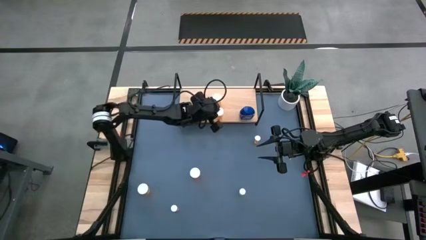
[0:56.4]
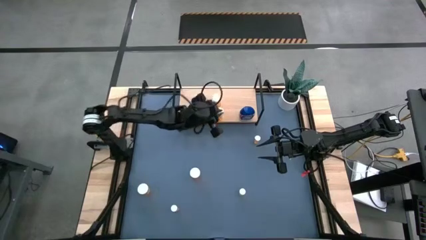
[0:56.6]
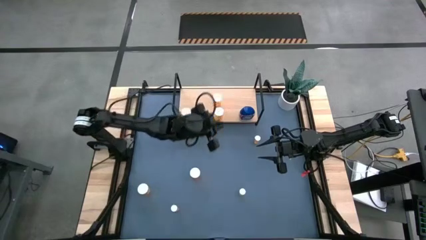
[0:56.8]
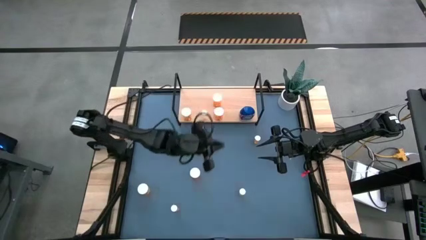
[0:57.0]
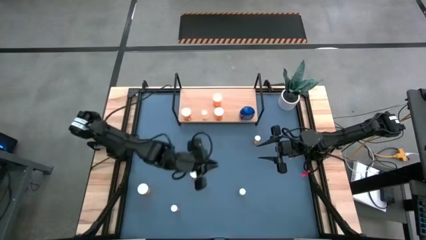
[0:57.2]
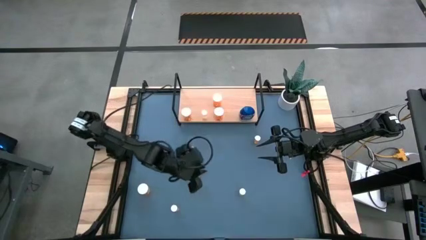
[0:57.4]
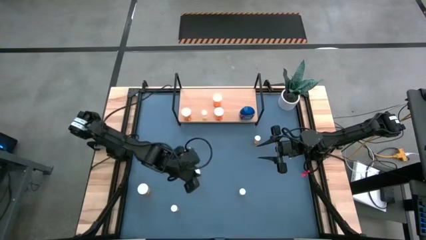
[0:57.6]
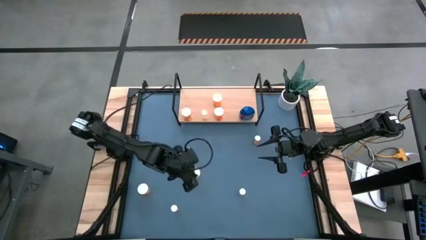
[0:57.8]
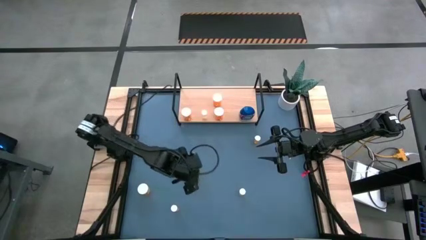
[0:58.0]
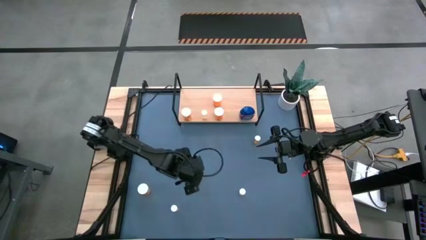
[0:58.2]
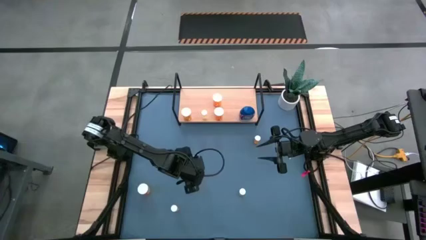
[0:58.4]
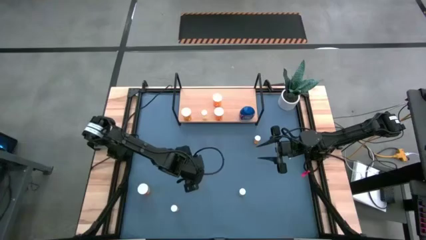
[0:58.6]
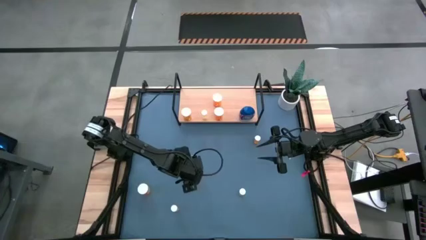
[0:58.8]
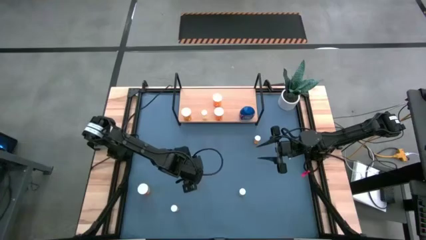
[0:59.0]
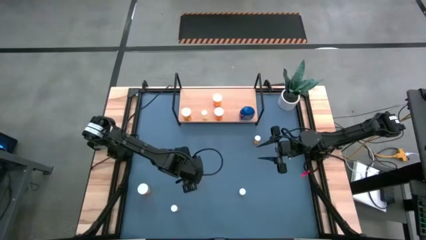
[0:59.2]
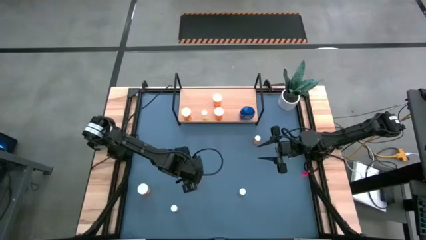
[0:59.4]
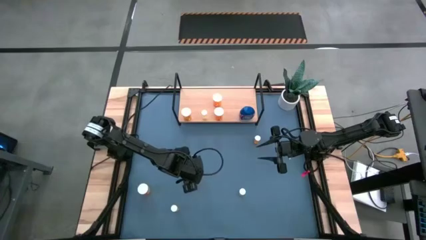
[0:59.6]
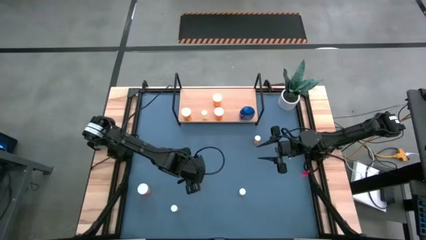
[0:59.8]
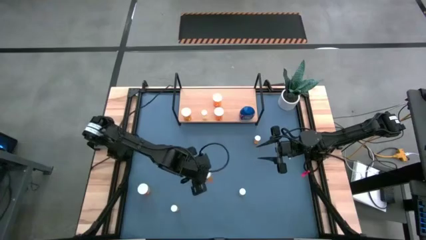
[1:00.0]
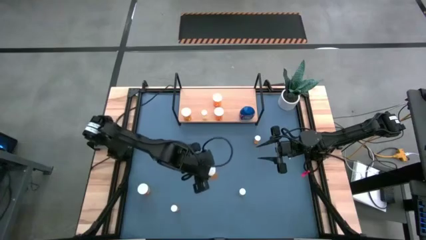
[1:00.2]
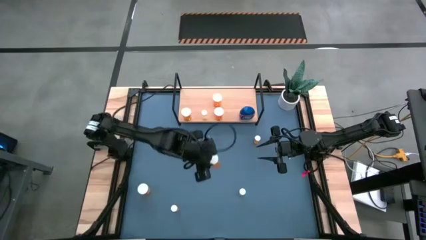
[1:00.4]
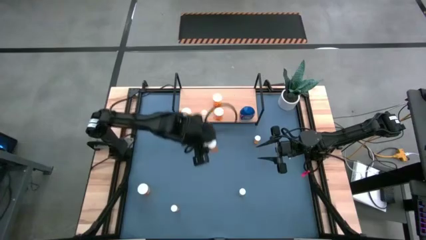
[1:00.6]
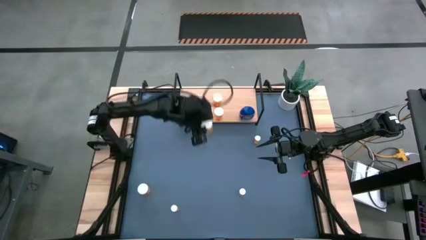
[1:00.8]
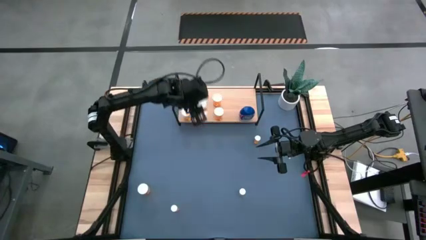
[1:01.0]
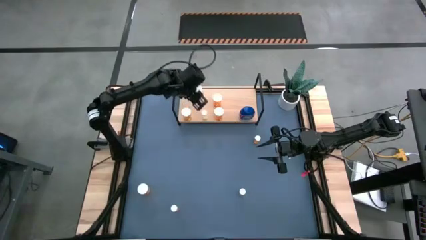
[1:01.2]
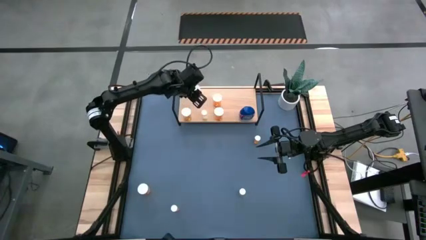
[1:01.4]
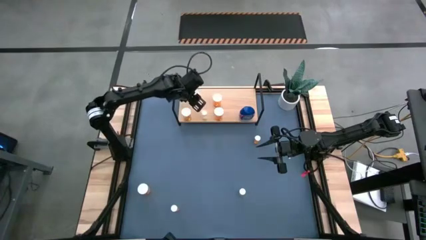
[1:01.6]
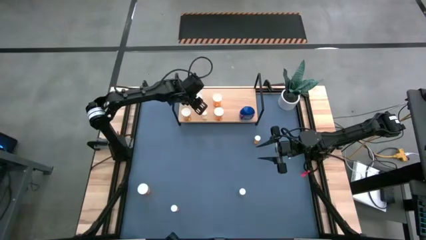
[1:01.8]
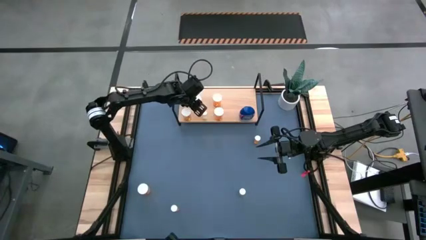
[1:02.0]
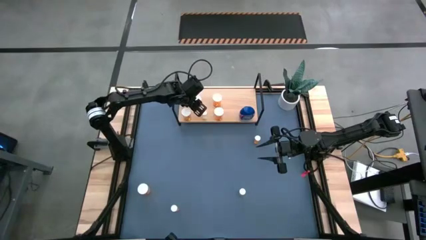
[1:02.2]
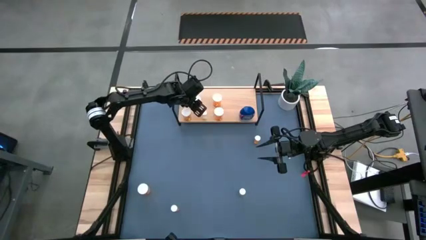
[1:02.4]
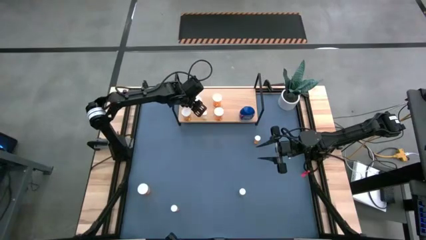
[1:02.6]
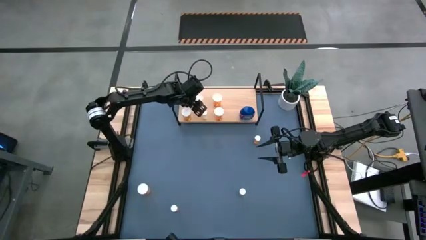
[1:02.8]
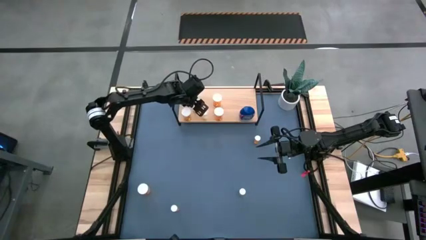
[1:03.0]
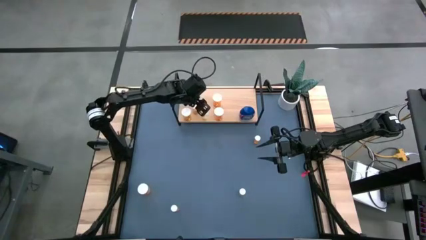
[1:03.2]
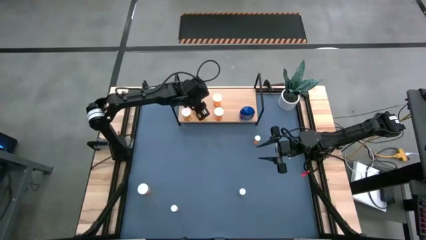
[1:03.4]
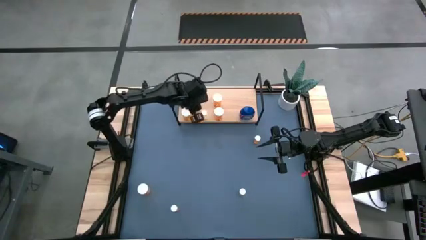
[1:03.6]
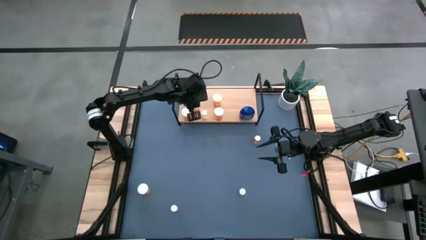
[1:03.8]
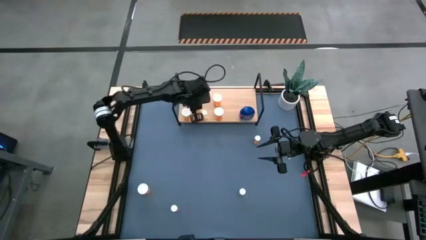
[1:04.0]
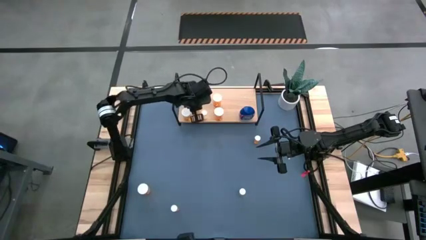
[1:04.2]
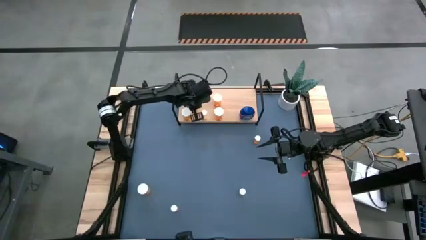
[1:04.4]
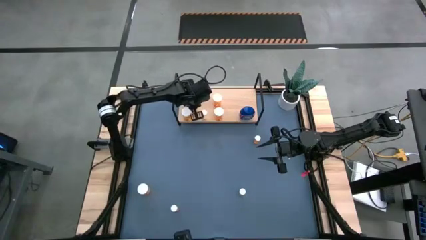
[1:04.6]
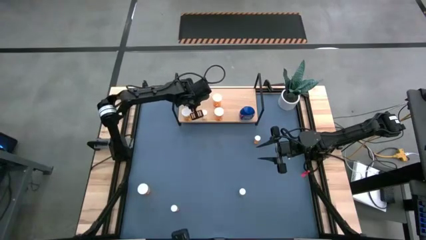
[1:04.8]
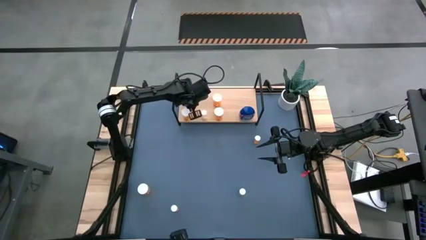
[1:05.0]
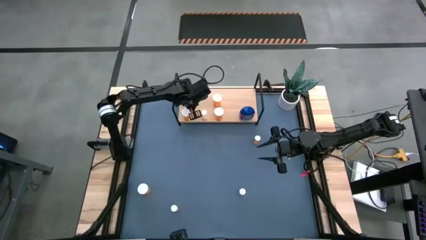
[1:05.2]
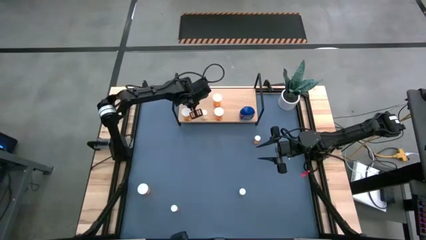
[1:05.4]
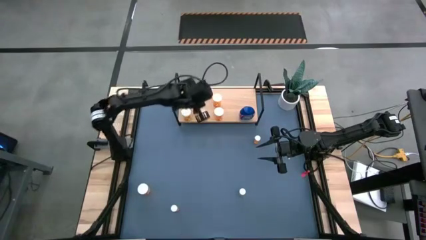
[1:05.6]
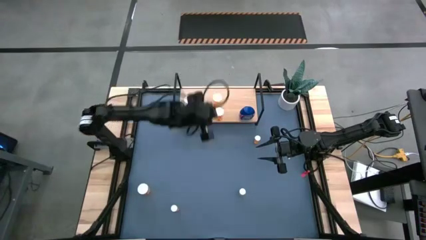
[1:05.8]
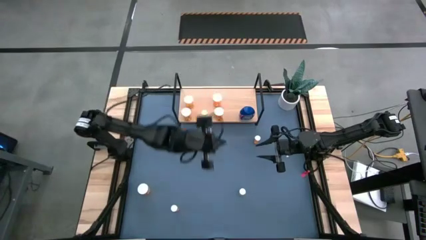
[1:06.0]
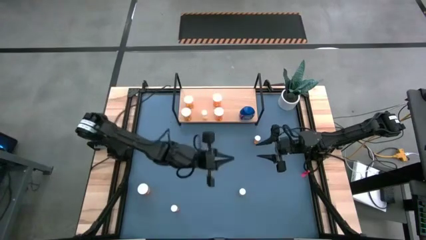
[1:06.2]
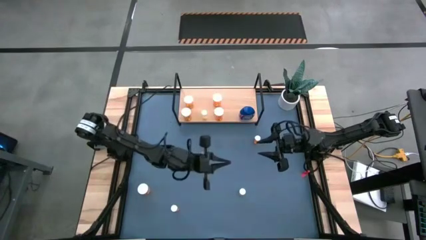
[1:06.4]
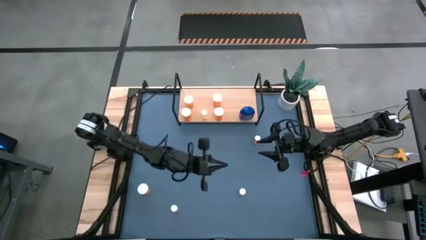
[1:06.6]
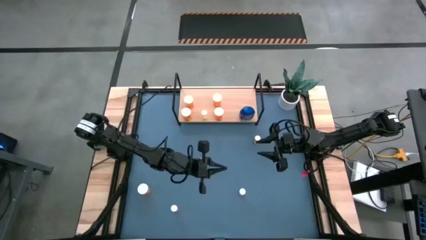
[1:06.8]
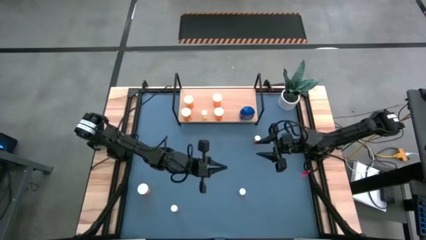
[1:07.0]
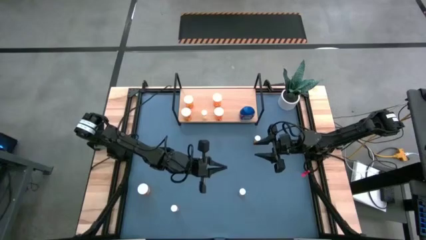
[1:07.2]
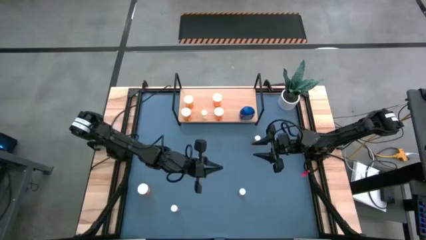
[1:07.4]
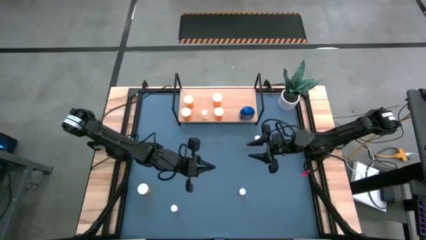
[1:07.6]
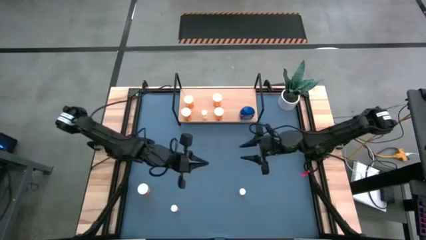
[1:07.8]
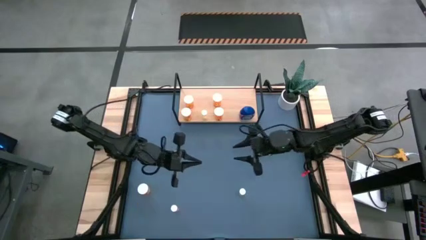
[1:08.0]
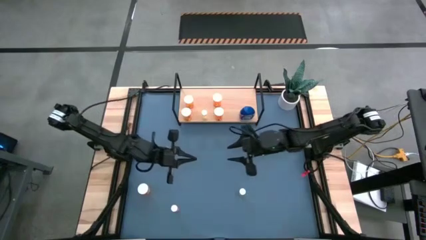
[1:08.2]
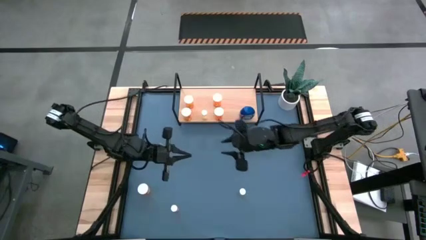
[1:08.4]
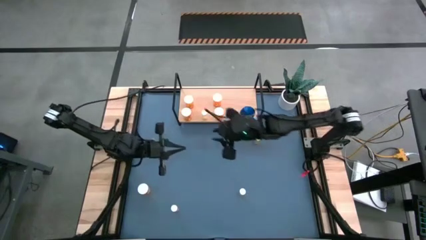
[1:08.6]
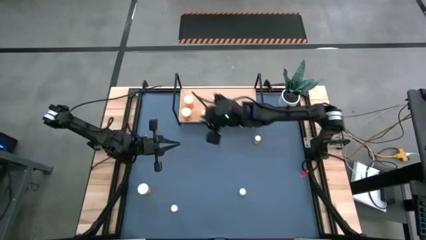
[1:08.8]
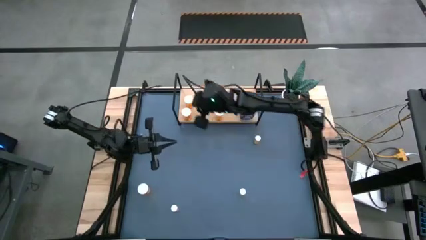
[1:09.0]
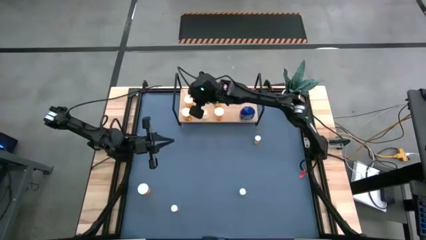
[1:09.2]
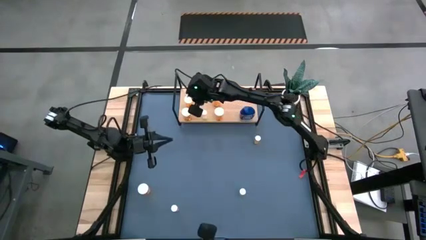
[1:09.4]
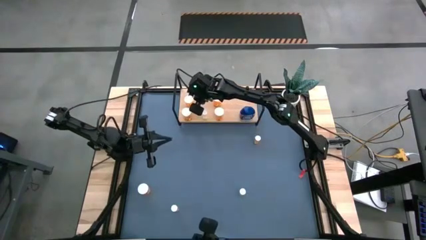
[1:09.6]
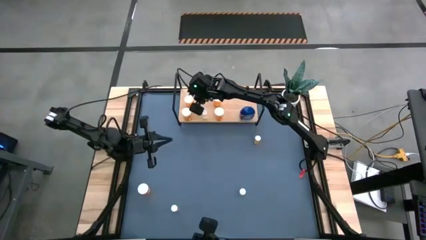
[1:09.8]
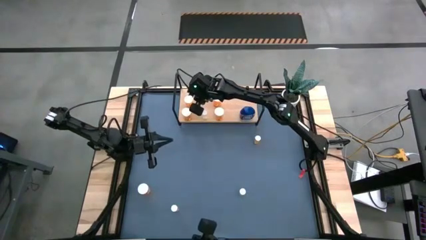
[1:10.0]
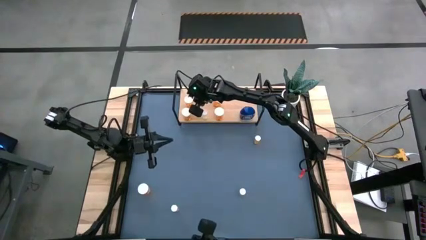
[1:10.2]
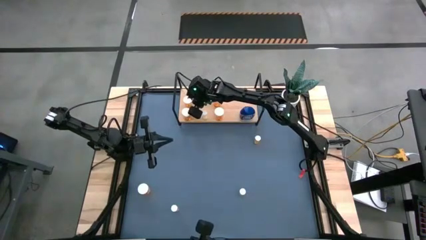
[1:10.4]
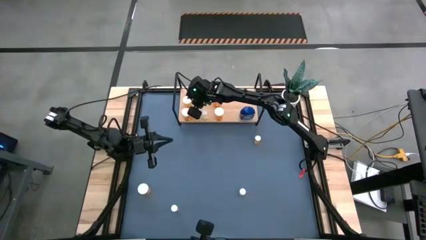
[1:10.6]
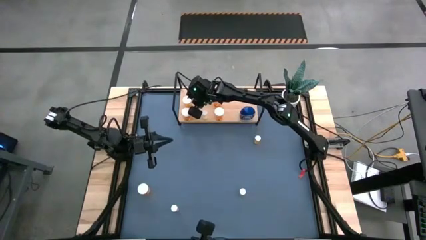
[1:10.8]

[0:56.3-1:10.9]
Task: Pick and place medicine bottles onto shelf by color
Put the orange pill bottle on the shelf
